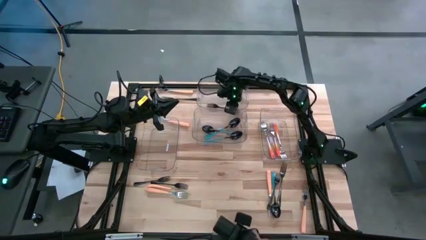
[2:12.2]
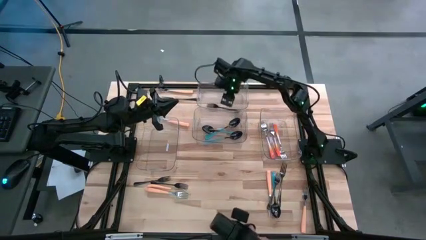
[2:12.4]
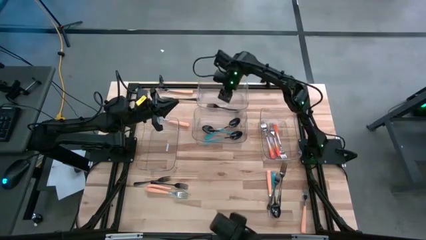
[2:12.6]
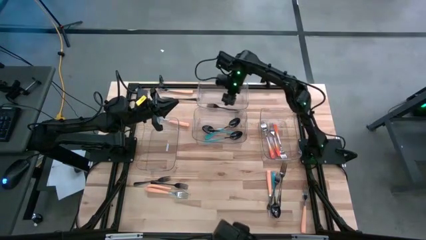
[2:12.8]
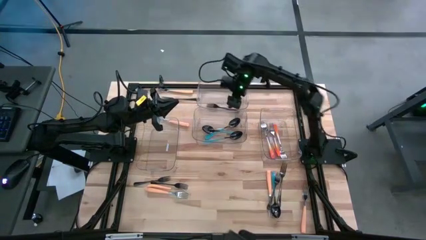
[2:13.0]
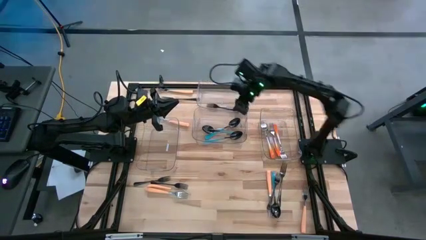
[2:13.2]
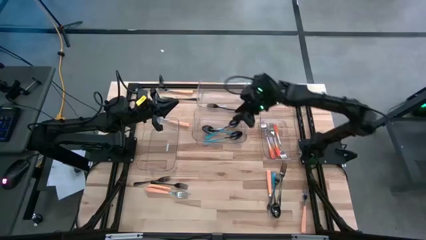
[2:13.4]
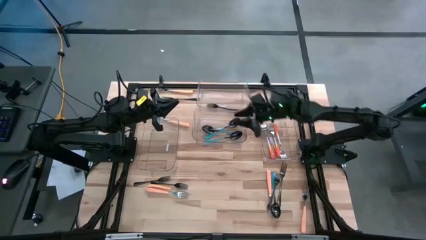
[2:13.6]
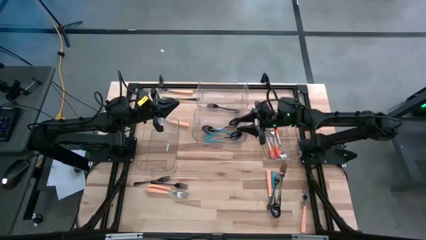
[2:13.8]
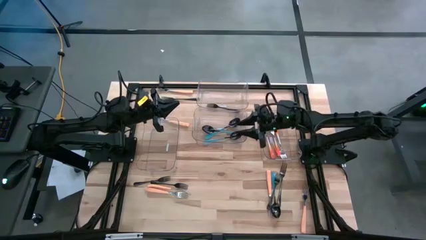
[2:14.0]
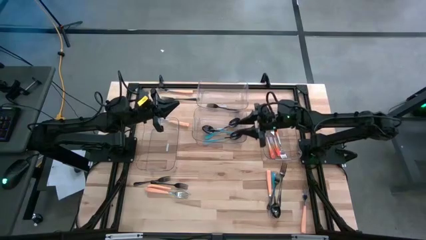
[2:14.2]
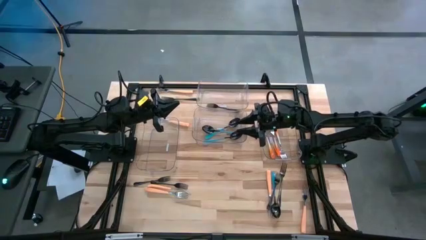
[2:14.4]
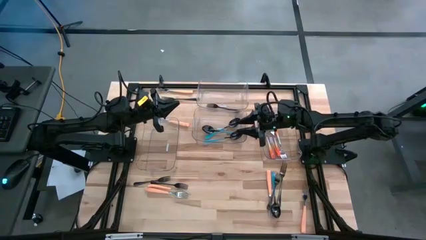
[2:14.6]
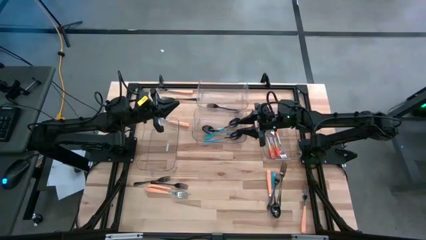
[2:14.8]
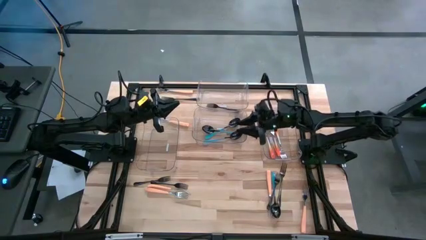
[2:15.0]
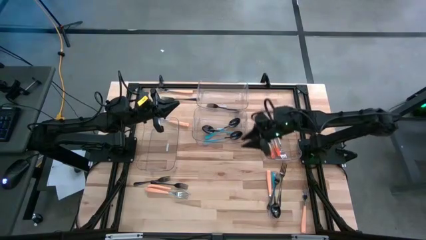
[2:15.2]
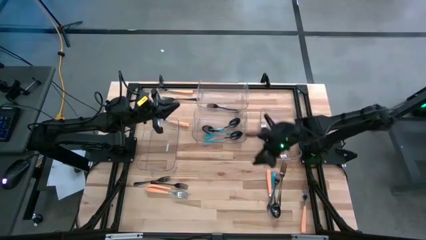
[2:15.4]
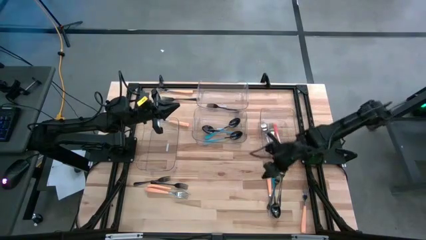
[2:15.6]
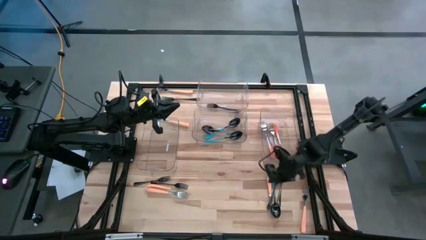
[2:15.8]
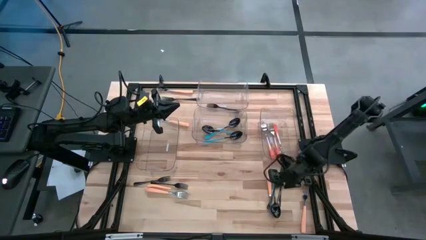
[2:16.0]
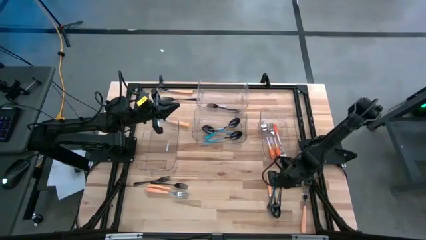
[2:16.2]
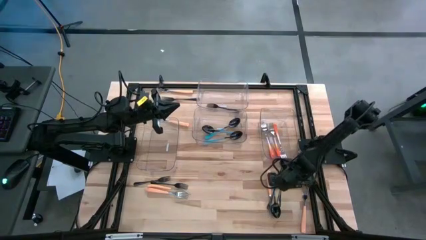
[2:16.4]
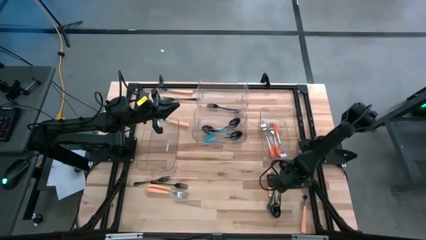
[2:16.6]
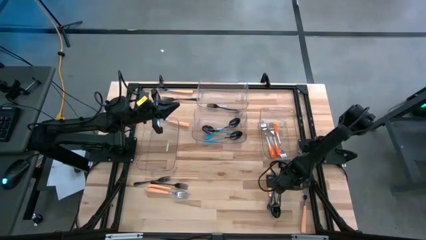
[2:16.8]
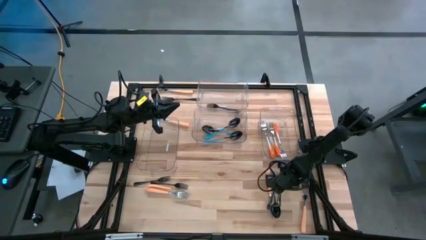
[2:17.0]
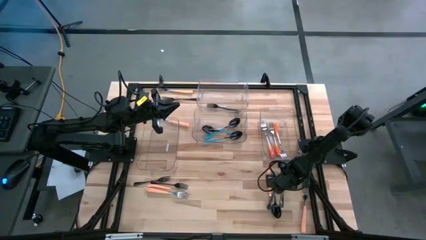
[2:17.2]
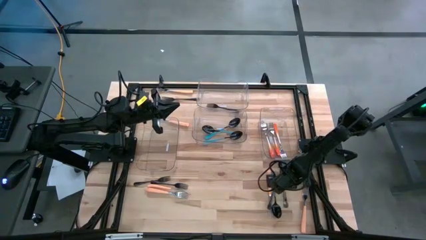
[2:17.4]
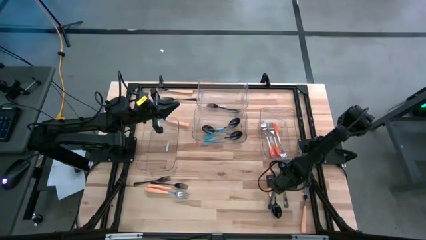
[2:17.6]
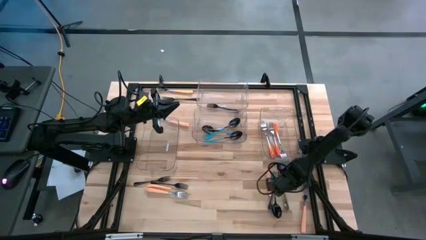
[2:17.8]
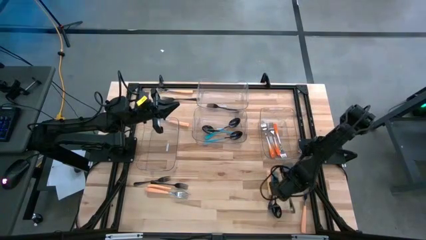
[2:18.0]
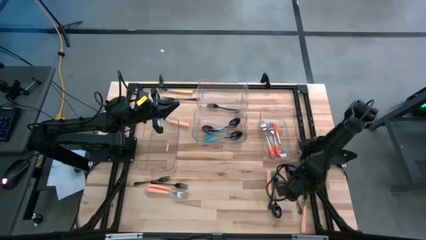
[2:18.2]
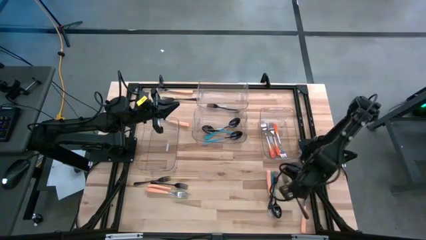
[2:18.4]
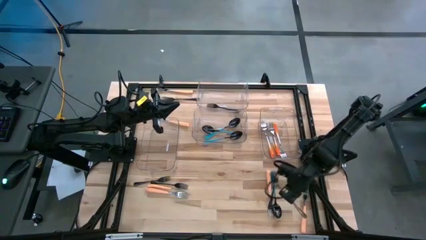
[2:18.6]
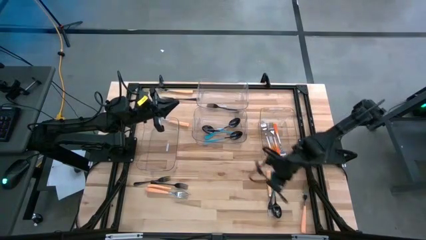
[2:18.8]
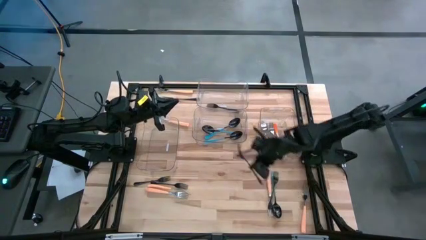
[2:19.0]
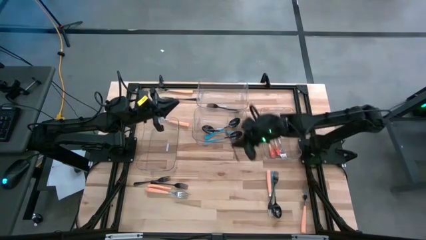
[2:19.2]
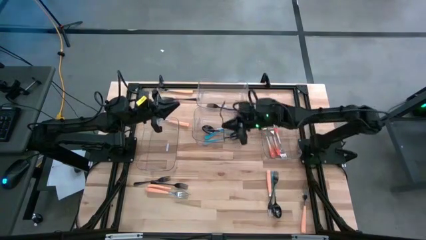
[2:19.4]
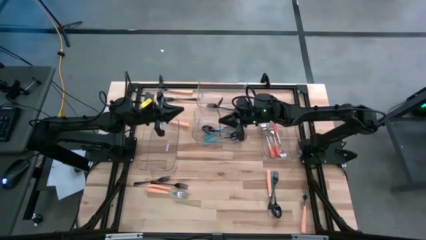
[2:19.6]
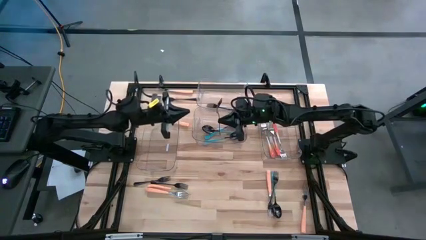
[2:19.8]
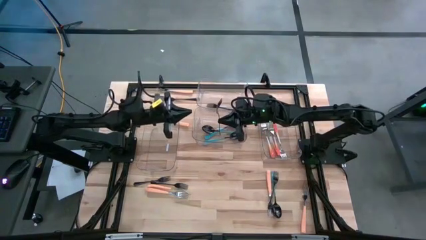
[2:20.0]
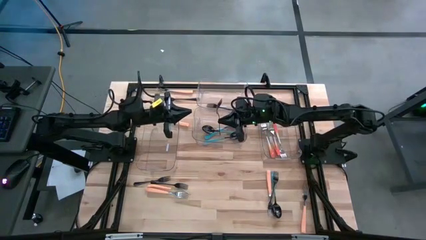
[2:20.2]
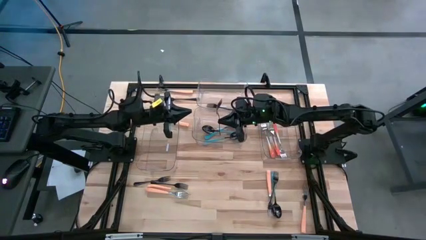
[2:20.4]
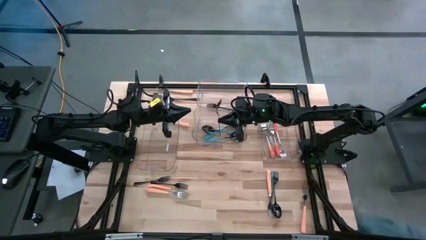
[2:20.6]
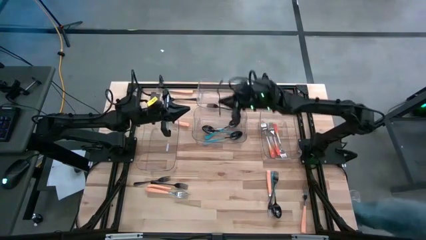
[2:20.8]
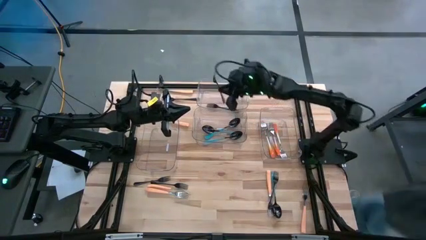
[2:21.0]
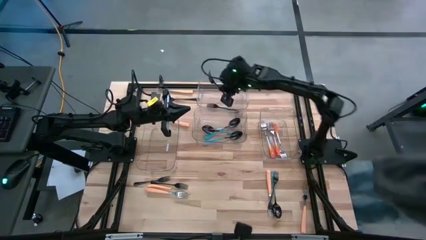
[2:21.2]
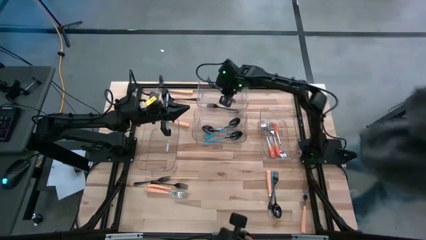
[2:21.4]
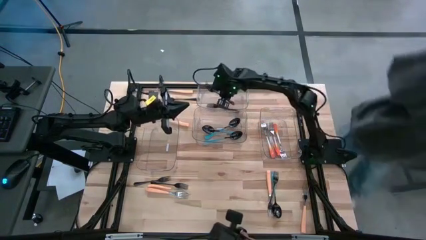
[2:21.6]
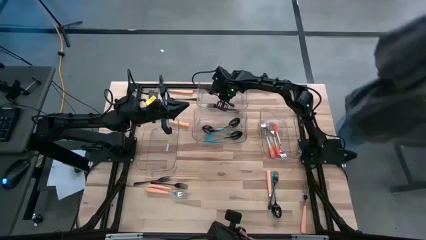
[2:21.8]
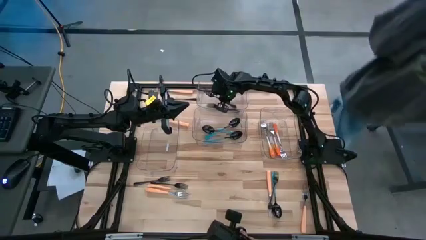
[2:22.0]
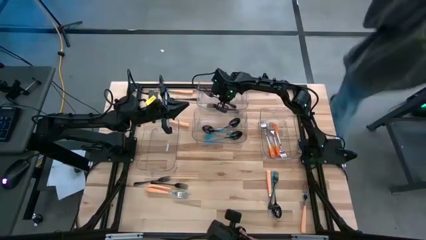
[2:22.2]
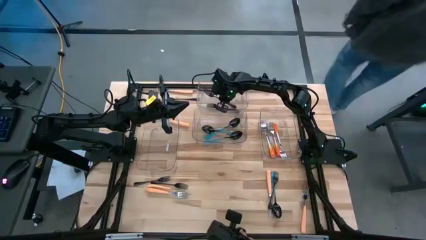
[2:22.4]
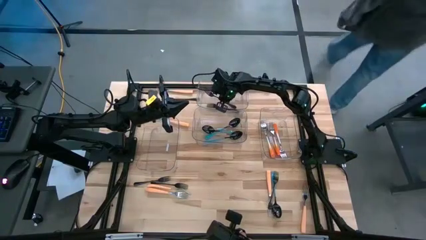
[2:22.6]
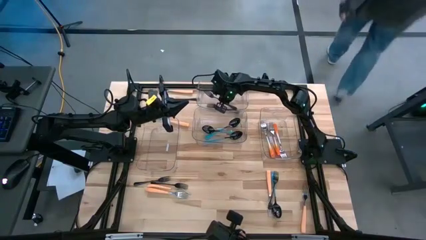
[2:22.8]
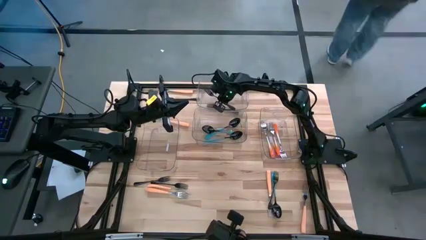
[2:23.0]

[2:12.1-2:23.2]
Task: Sort silverware by color (type)
Put the black fork into the top transparent bin
